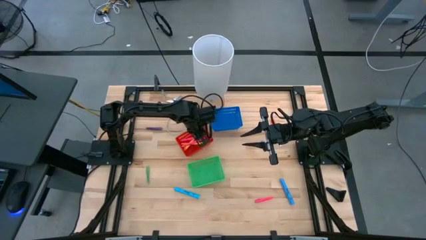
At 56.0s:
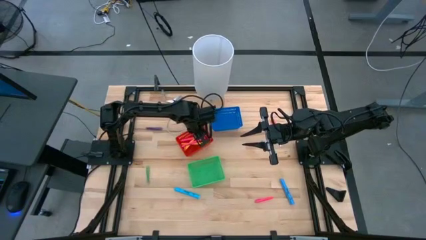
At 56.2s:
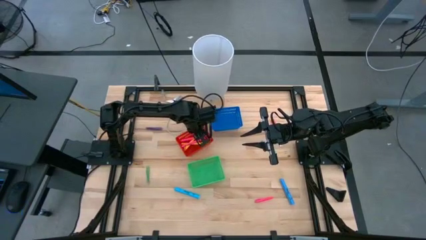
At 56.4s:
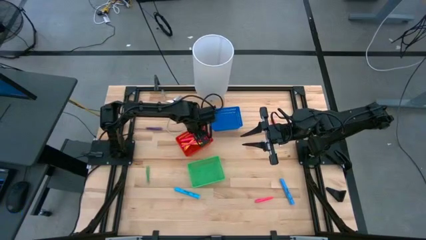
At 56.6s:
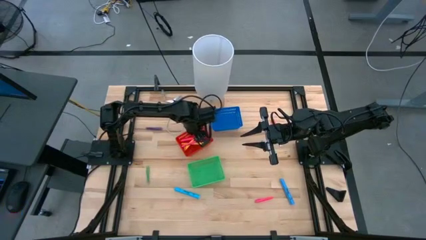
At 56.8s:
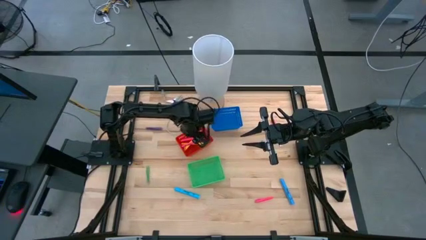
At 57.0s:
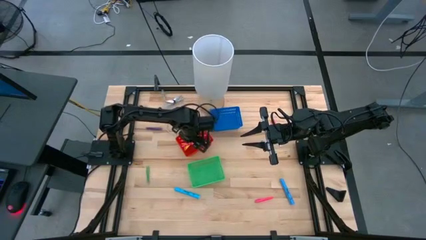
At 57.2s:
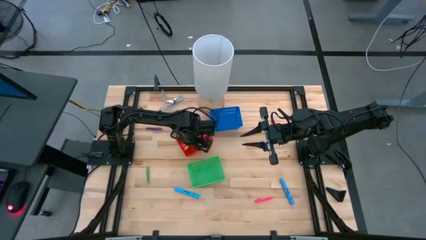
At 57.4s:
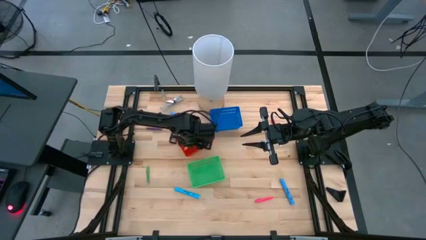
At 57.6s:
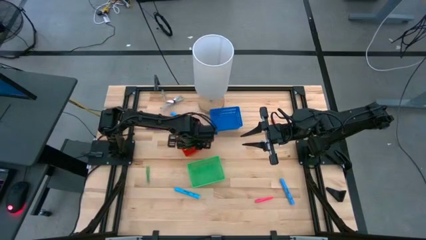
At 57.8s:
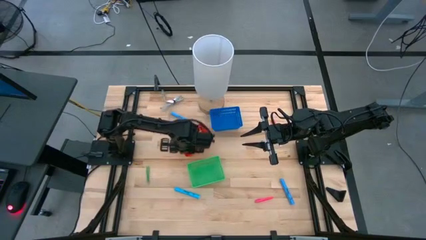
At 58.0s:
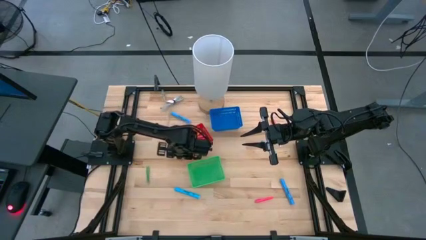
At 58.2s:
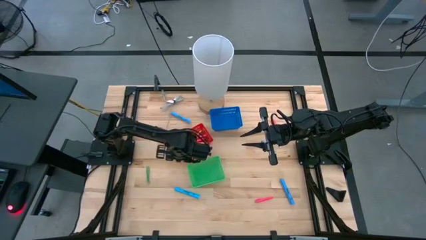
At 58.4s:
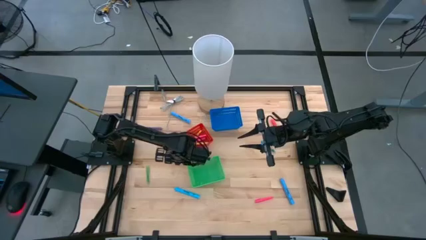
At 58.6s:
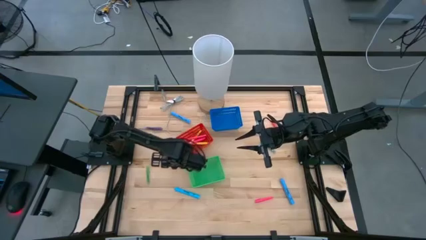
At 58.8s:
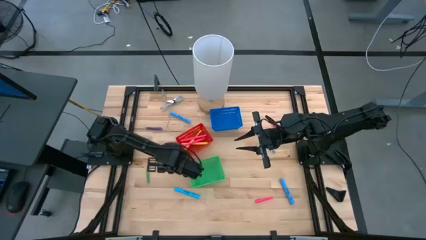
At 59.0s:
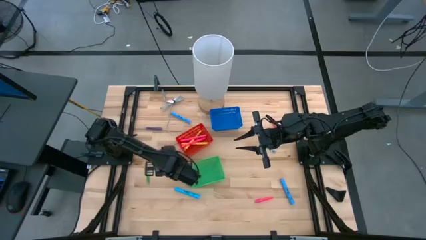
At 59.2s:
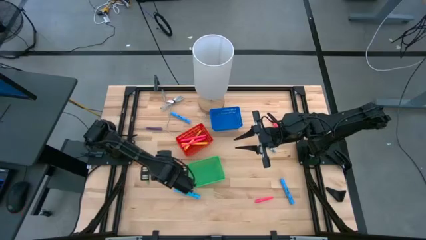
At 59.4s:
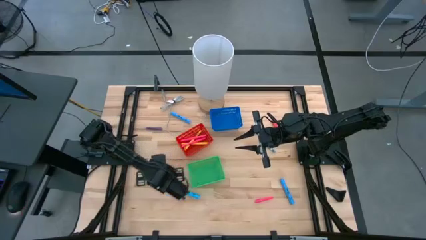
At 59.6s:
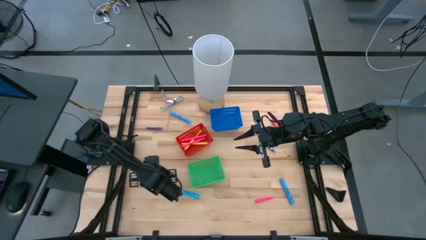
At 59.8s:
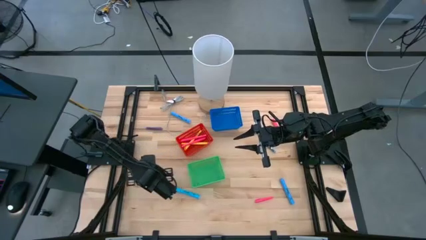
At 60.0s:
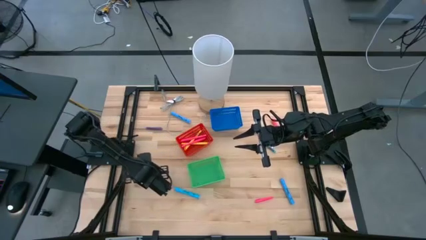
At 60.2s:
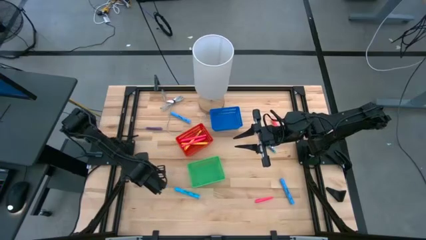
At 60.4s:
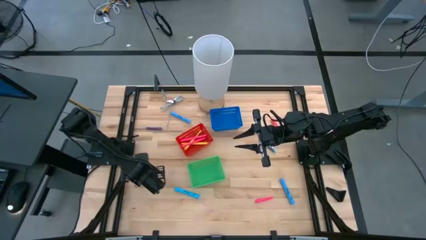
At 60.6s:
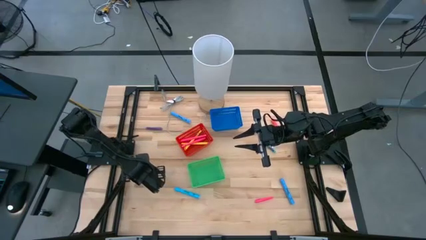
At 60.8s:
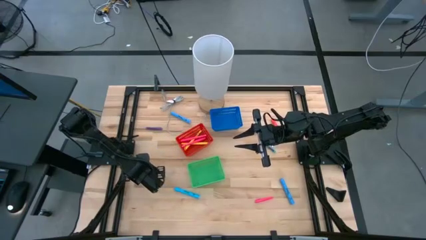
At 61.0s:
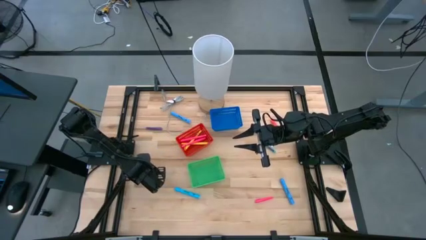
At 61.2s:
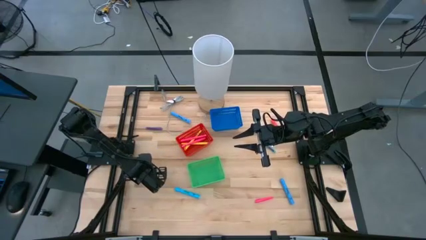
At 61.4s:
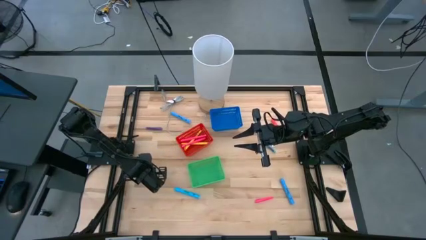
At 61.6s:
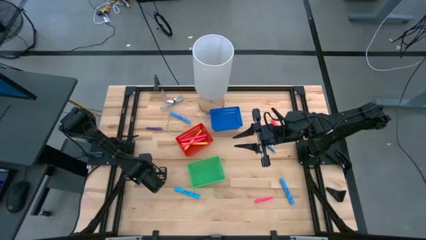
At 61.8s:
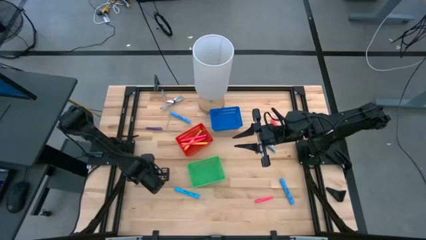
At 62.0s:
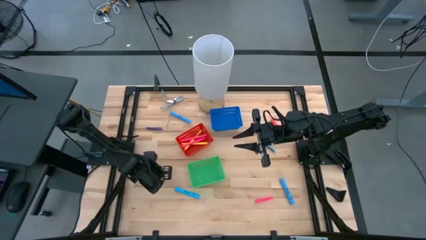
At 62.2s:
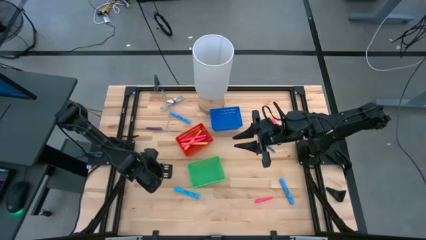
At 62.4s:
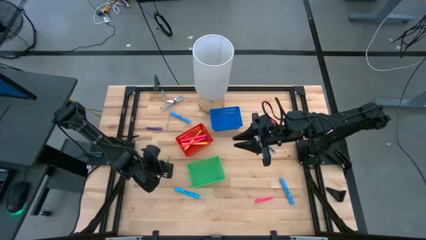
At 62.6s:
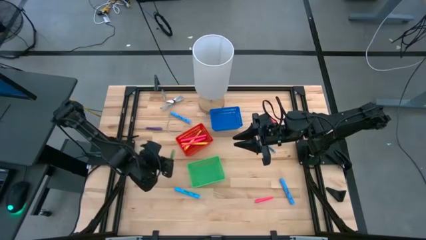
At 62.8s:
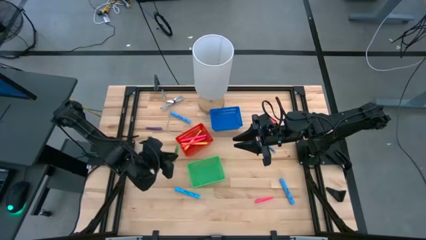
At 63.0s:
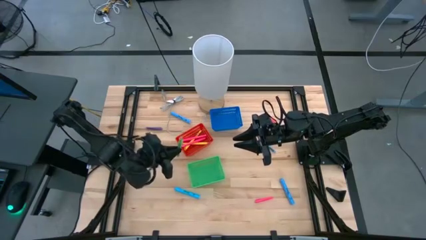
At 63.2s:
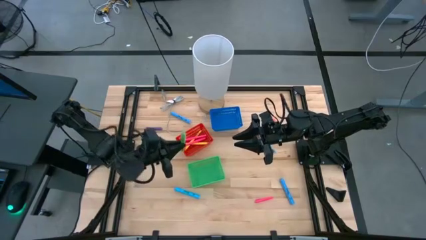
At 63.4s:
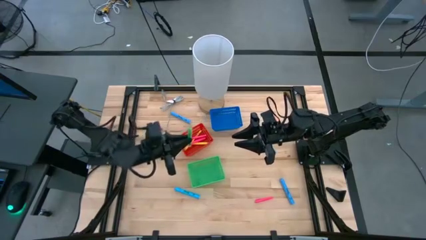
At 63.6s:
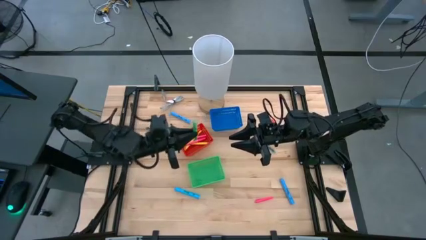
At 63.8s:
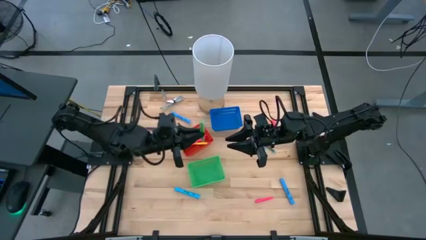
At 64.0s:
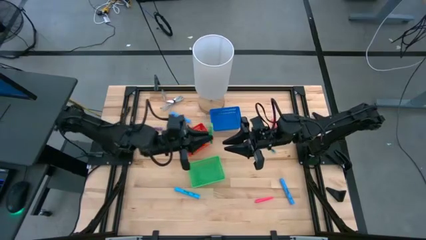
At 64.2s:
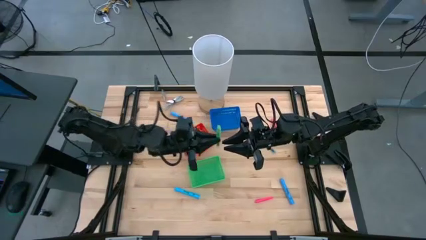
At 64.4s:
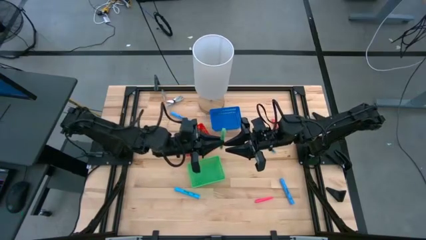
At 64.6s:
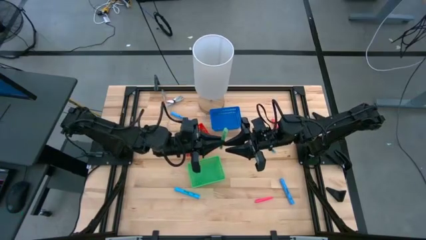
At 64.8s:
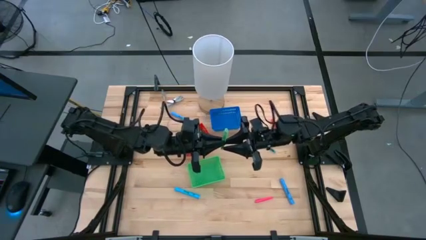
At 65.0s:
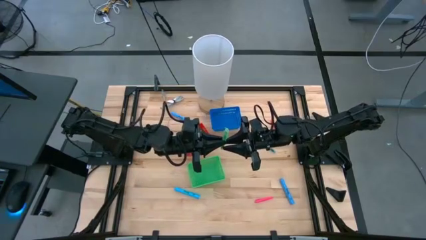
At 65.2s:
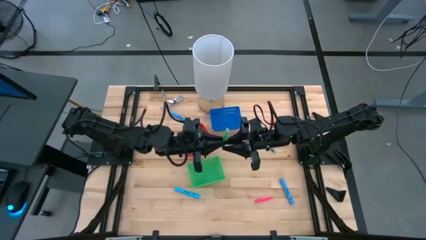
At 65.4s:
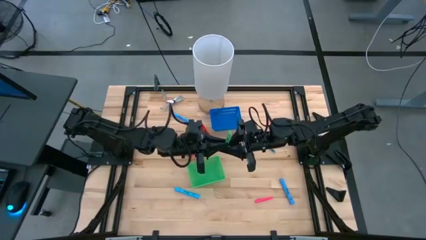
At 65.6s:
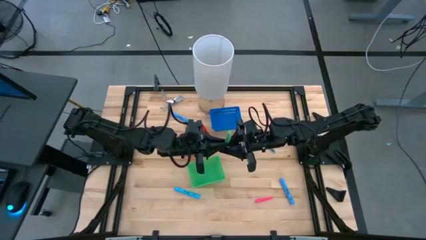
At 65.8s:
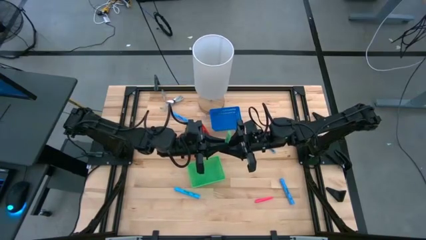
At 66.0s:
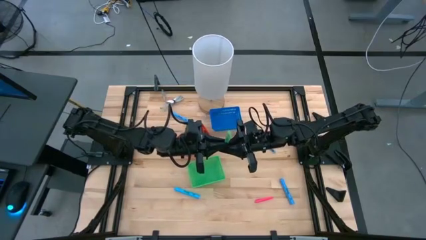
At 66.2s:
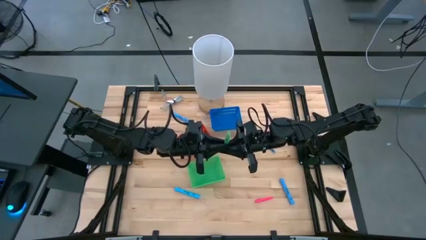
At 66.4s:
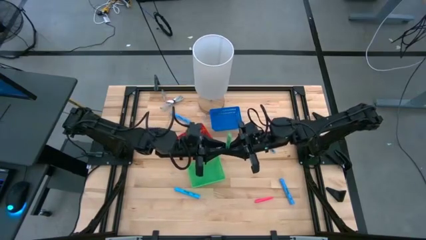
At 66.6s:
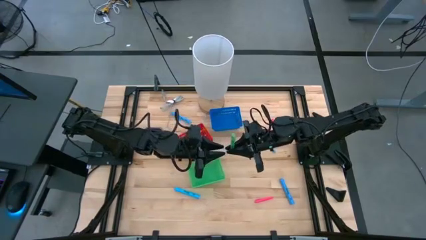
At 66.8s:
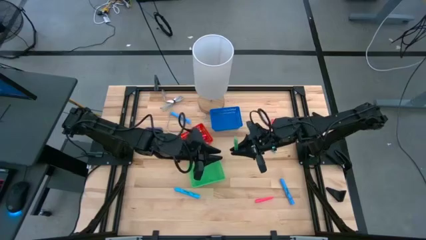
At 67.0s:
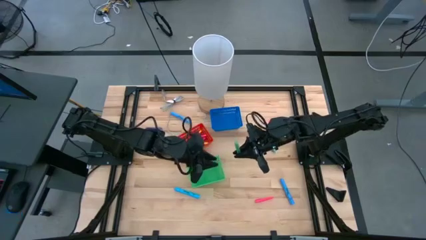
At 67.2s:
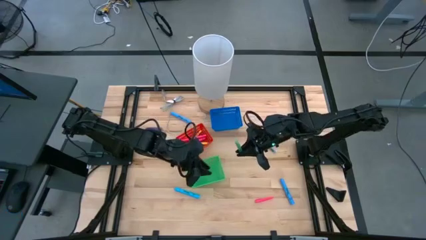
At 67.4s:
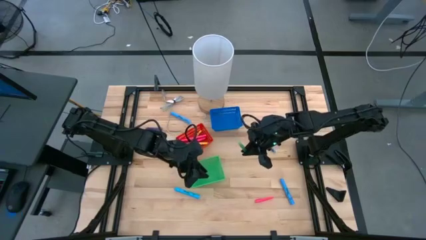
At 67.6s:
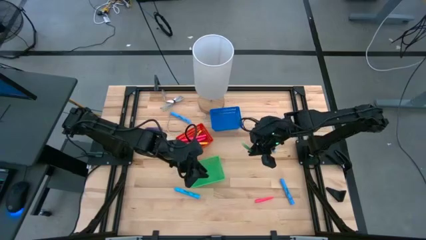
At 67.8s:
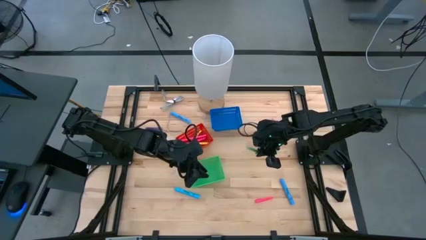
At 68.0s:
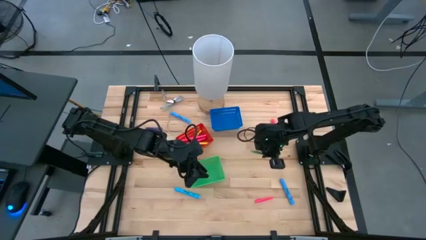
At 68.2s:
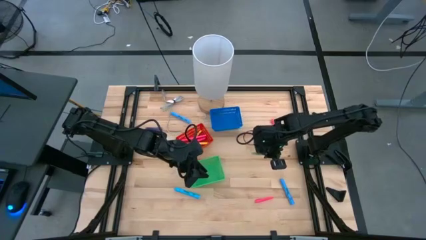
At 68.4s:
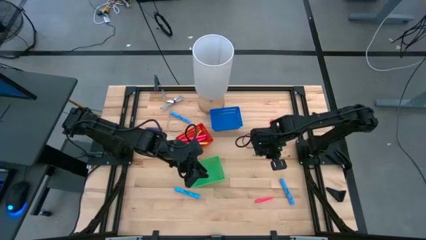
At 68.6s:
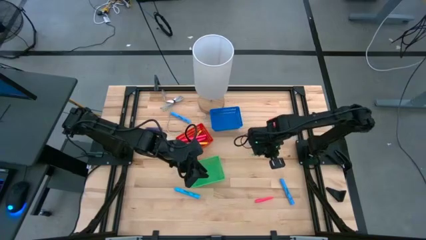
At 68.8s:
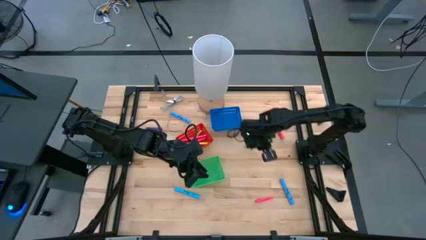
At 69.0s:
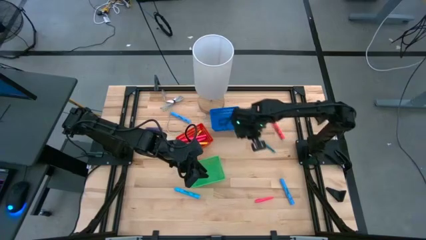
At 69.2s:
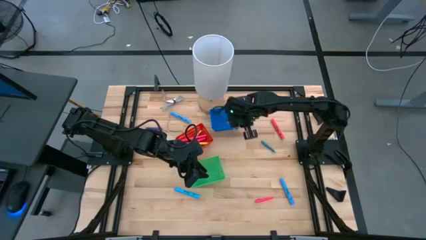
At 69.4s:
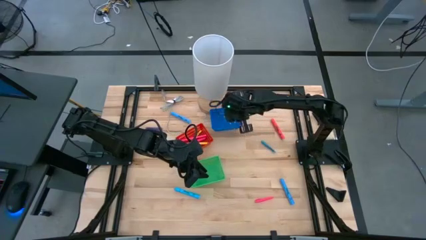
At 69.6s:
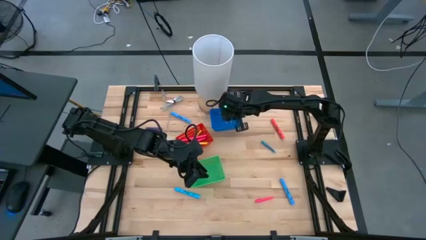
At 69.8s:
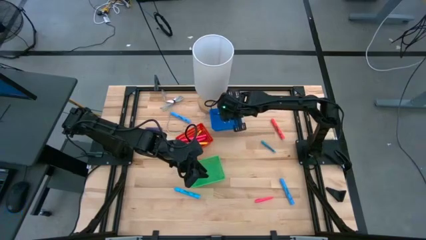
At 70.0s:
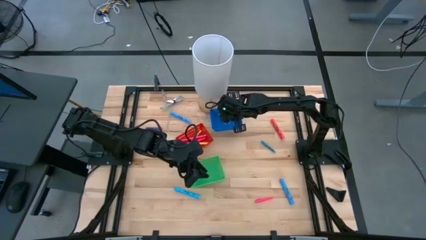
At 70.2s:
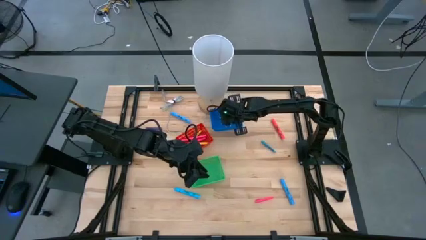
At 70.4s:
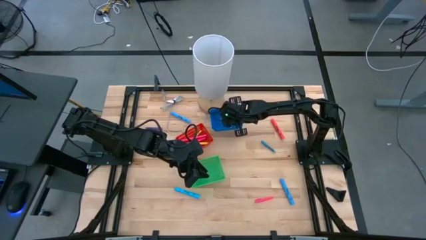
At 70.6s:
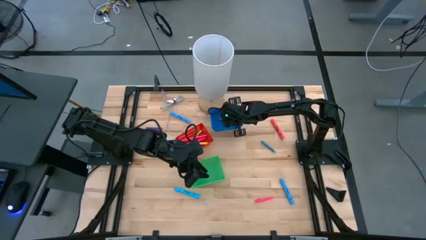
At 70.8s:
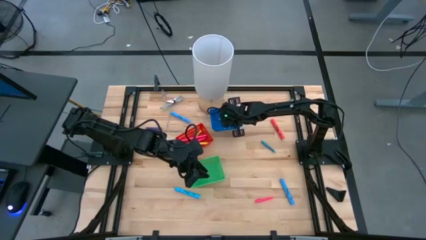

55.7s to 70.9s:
Task: Pick & Place Markers
Put the green pen into the blue bin
